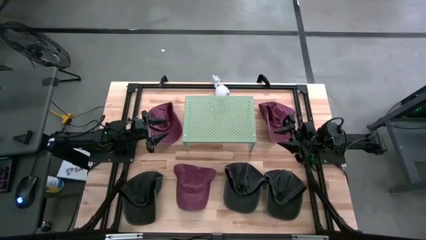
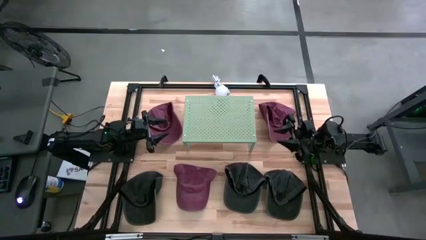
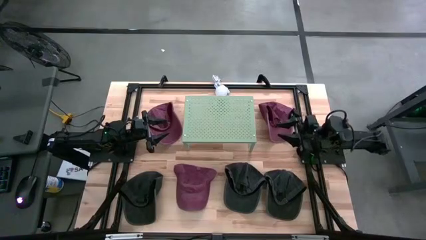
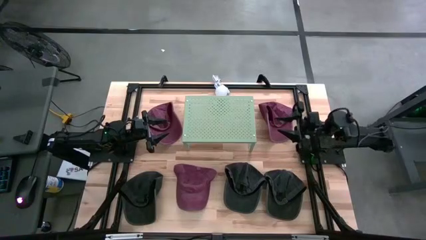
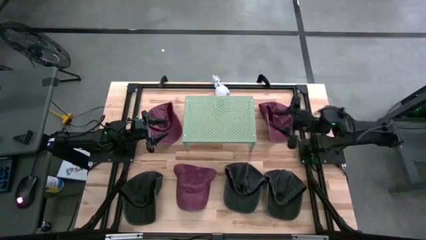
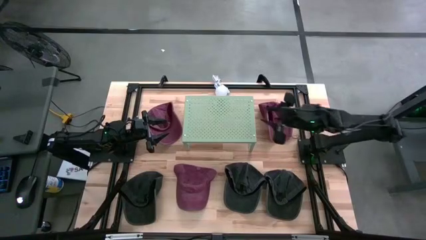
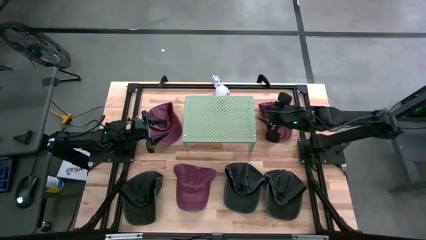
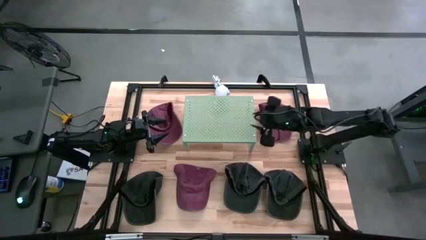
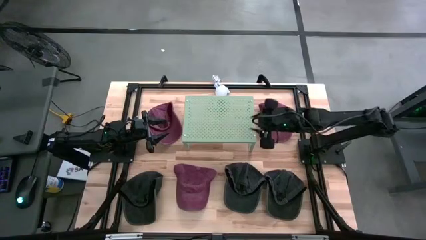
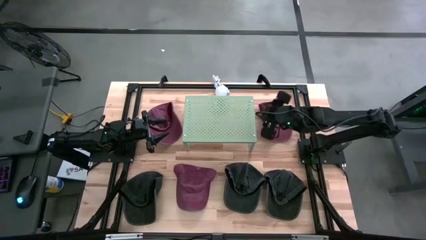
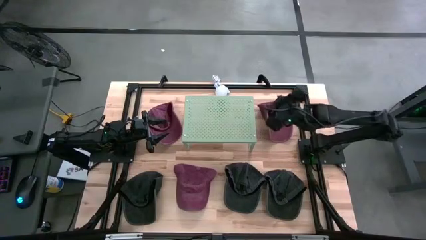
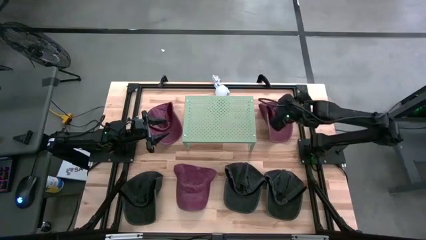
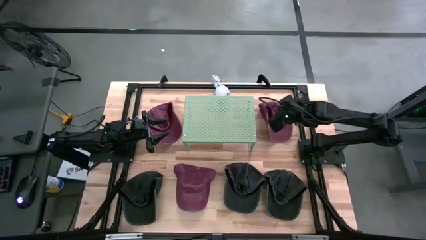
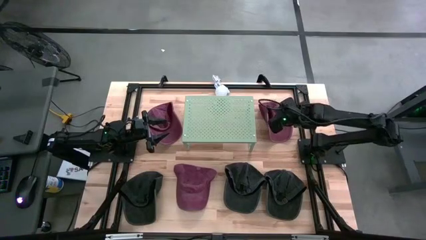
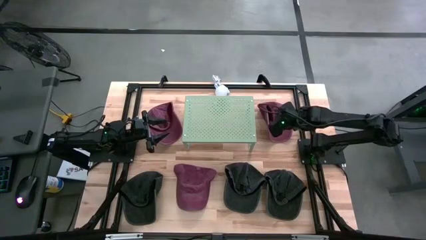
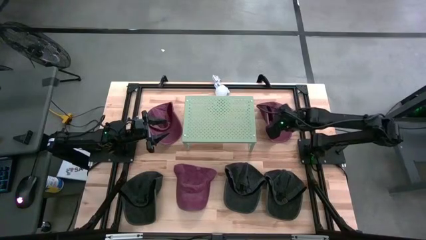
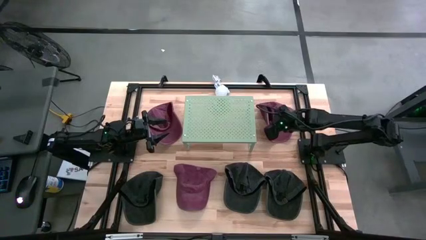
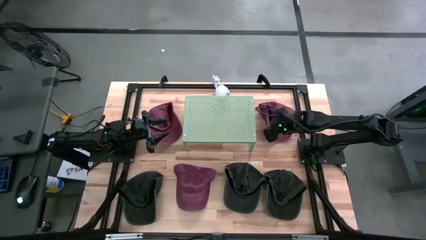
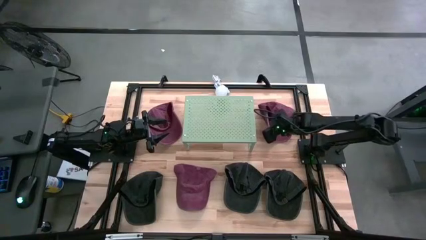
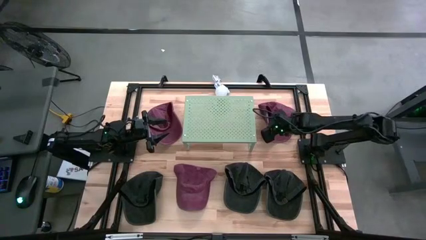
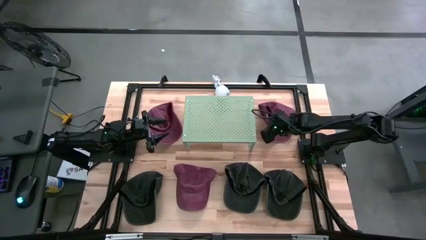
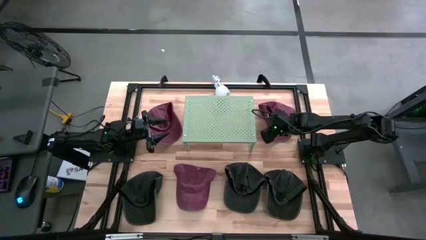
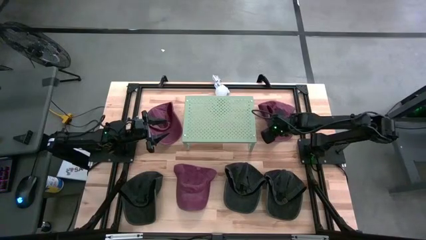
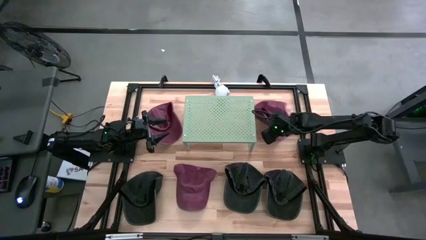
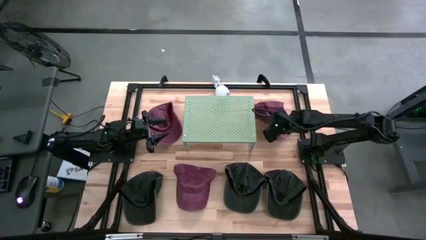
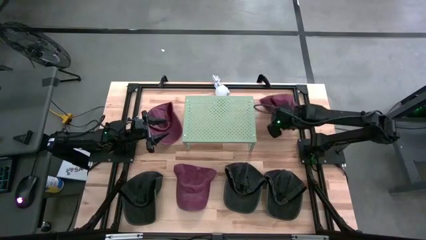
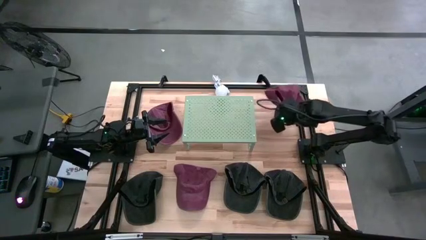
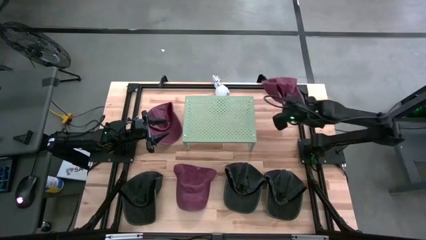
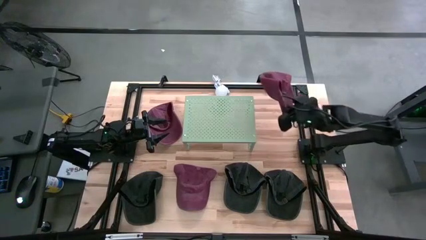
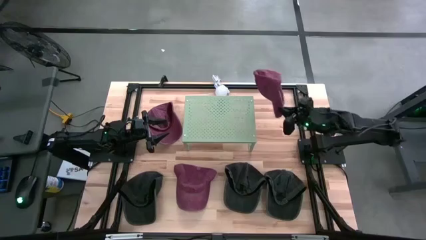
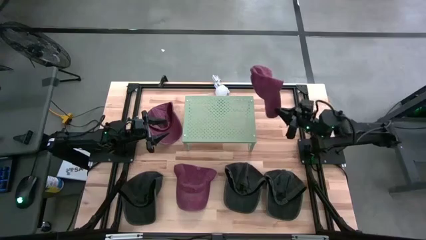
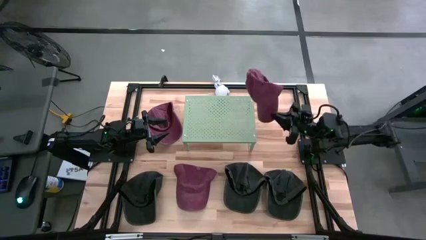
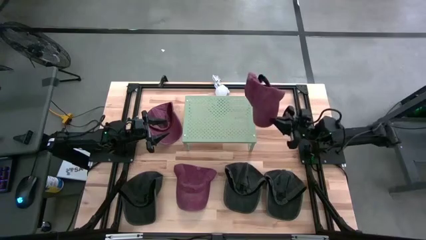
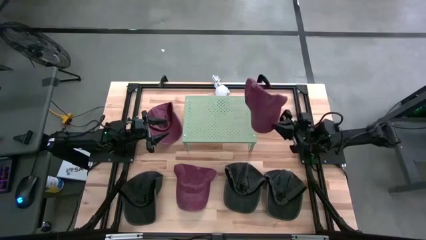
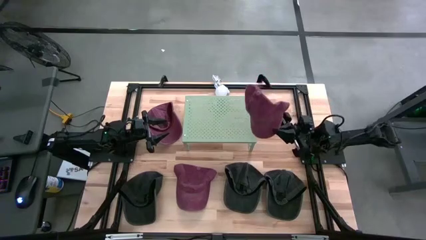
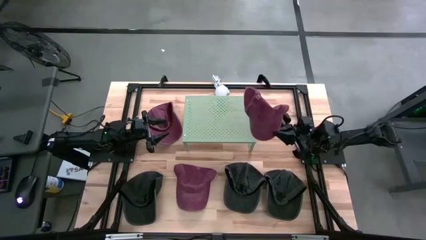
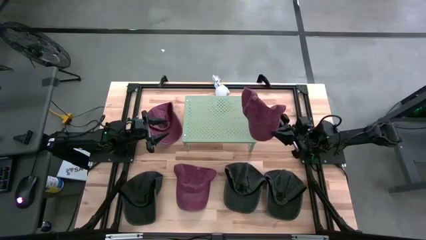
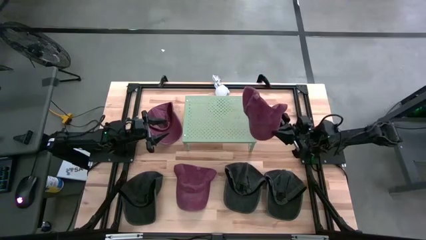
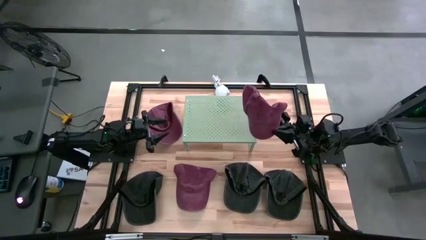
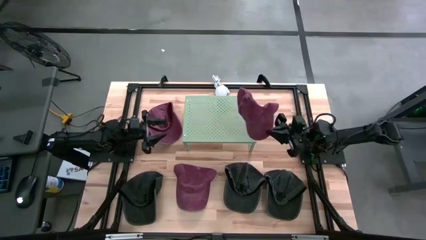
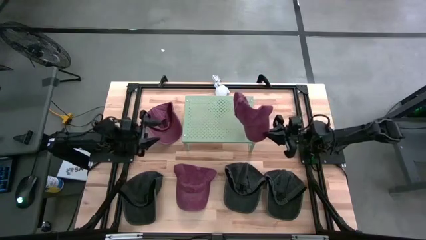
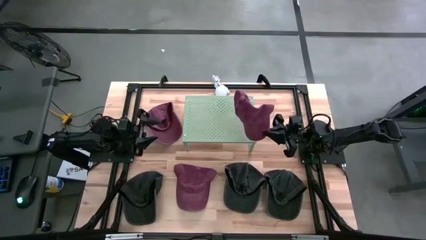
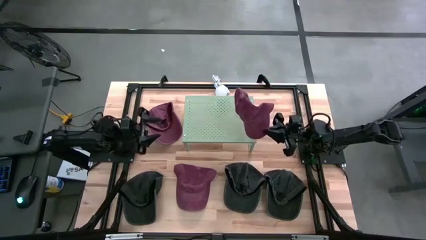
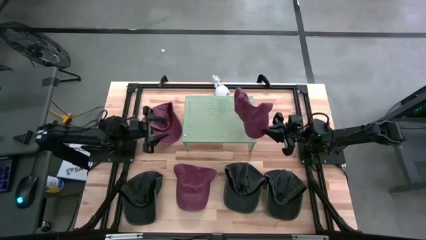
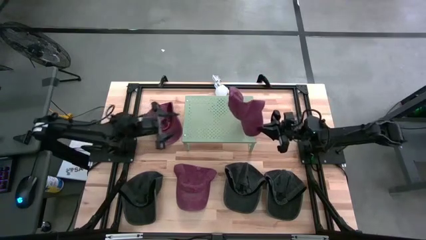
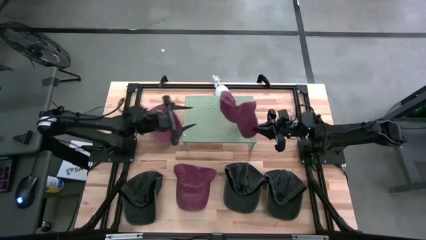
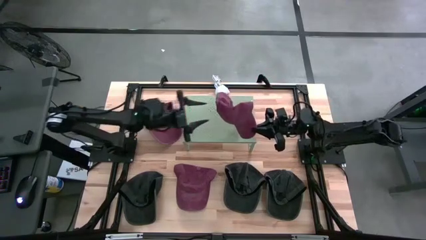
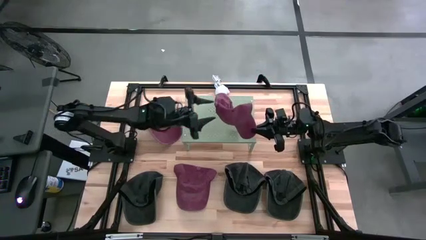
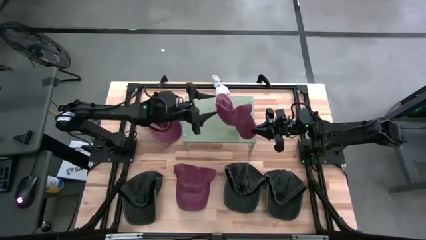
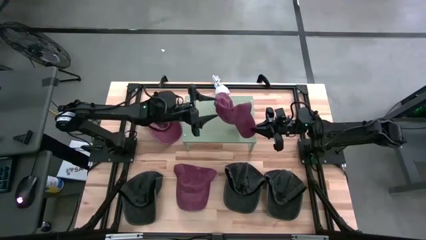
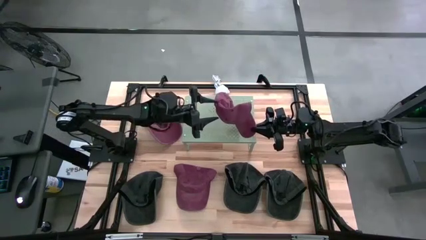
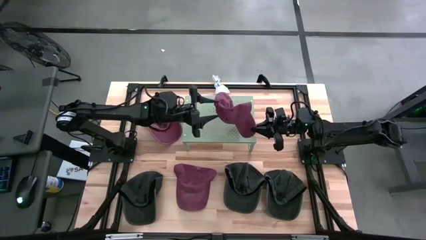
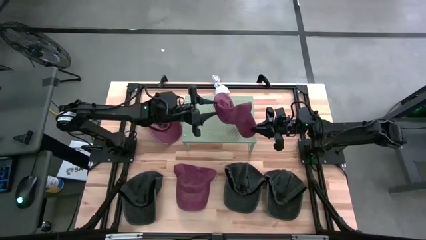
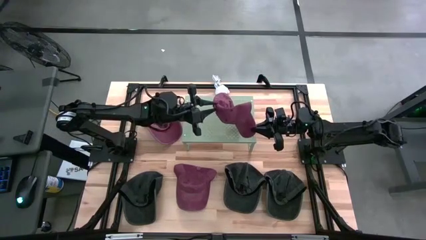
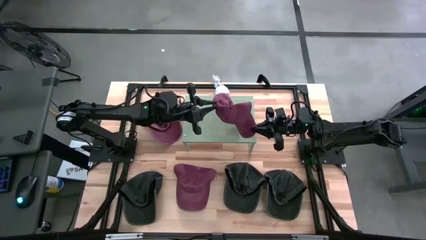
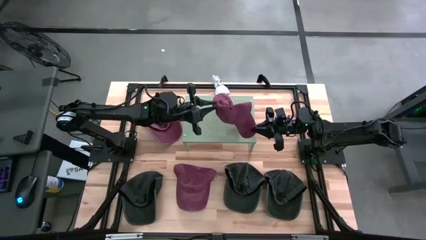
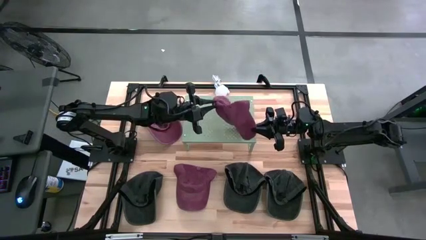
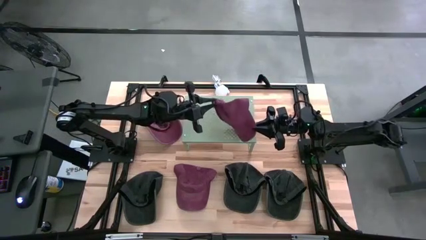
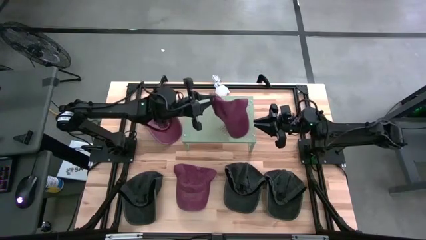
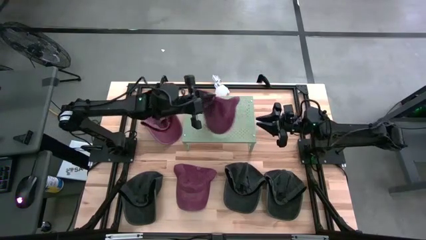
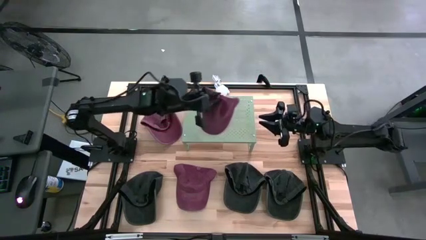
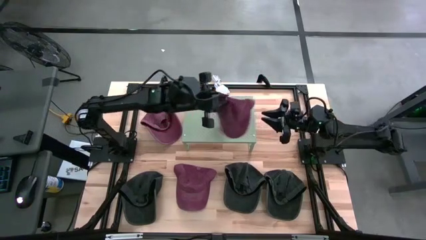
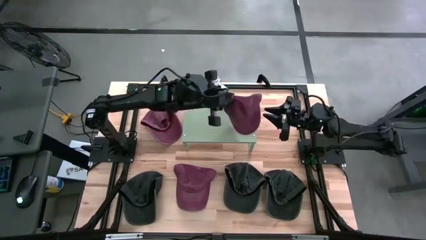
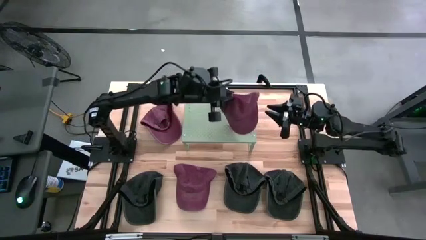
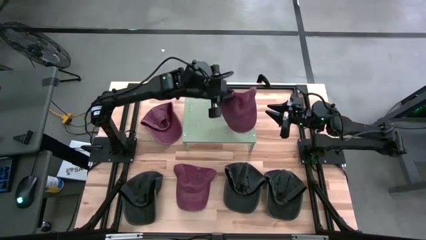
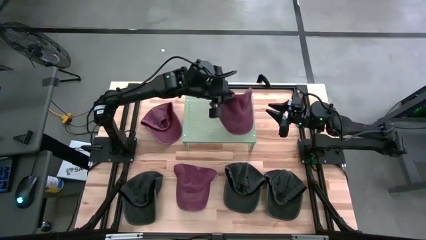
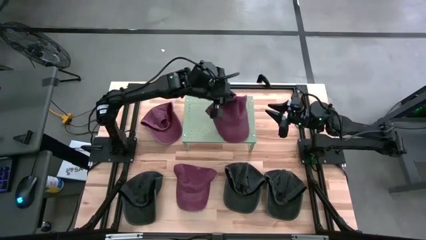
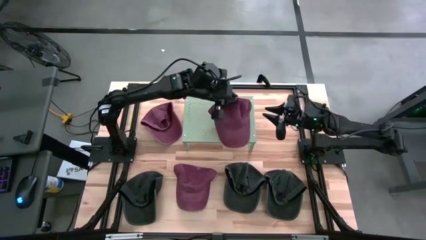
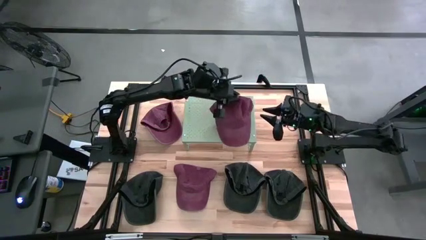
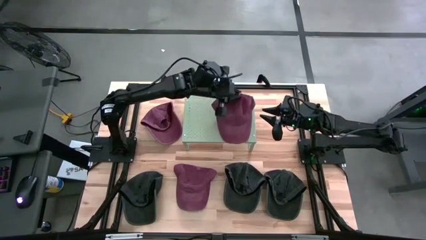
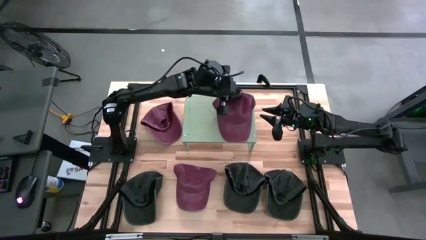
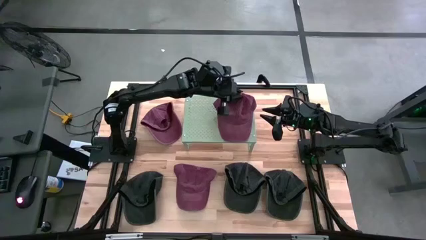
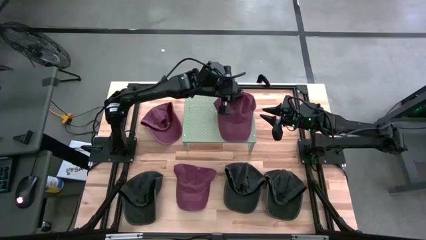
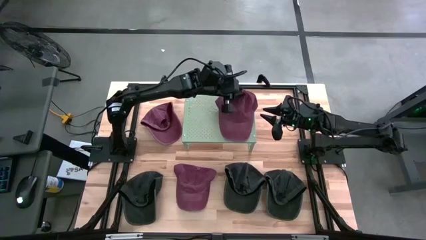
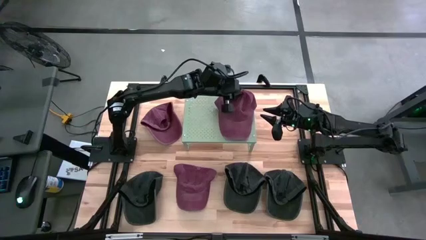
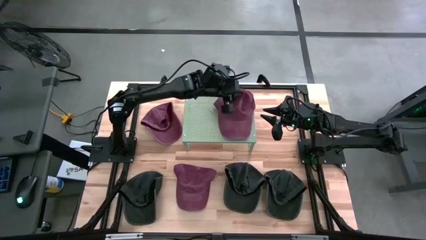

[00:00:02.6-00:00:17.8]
Task: Pick & Place hat
Put the right red cap on the shelf

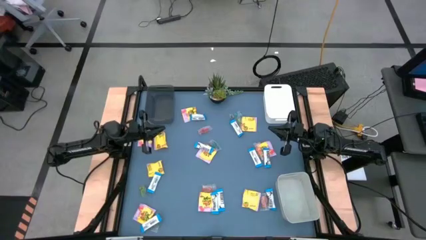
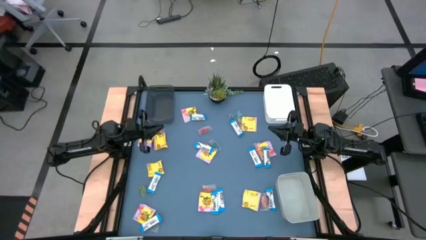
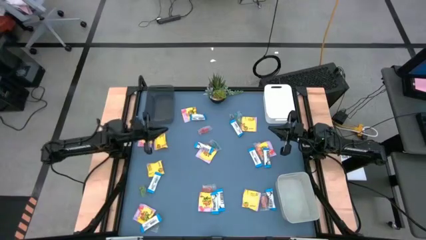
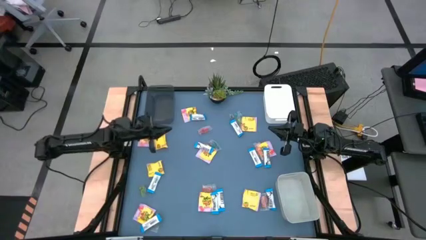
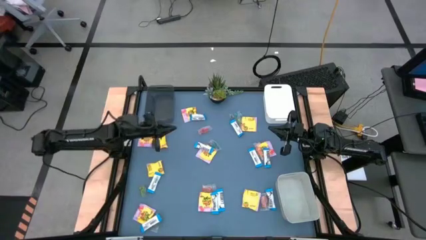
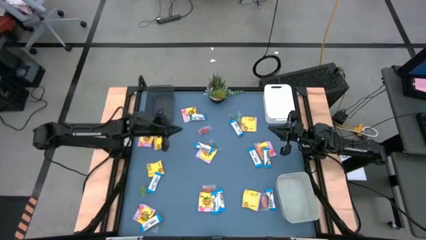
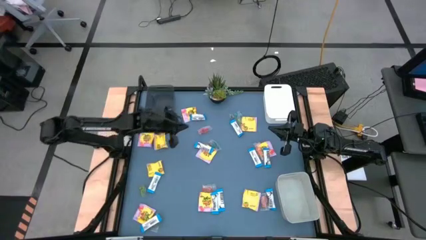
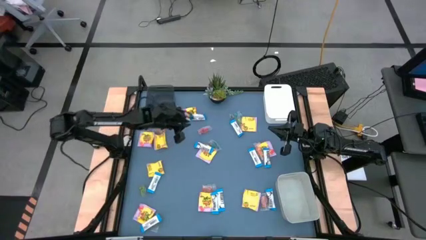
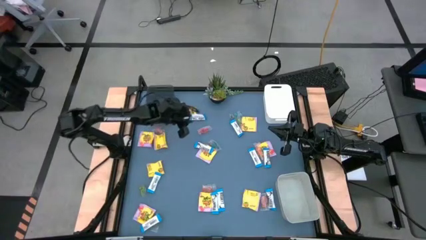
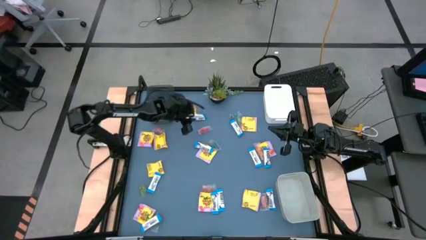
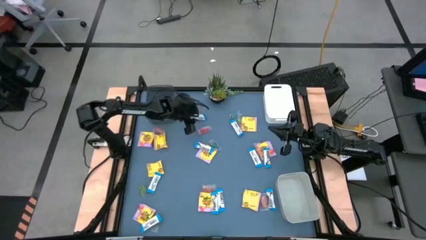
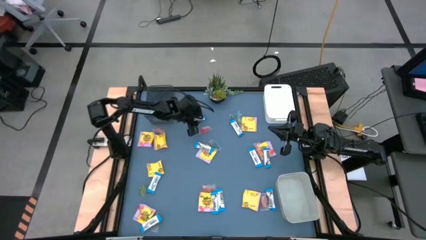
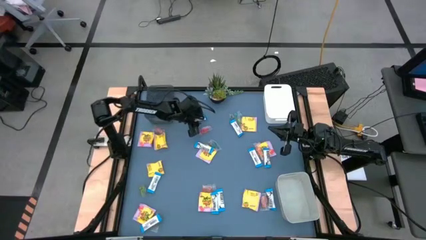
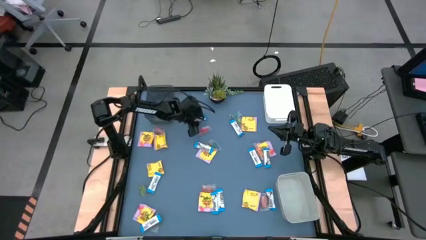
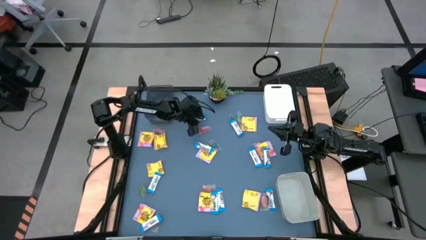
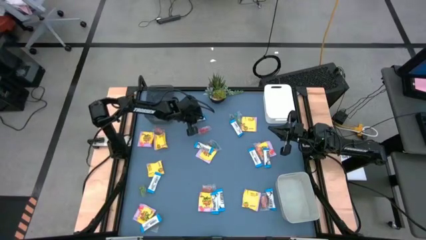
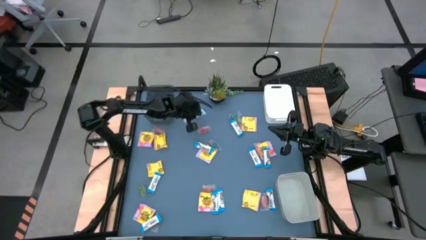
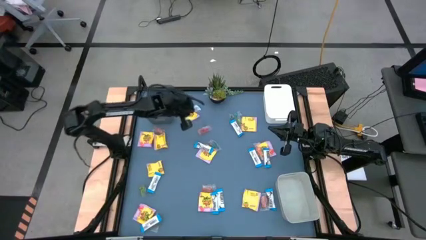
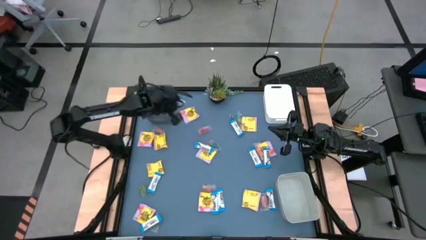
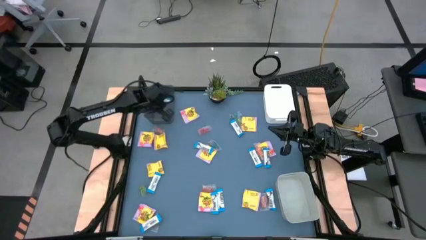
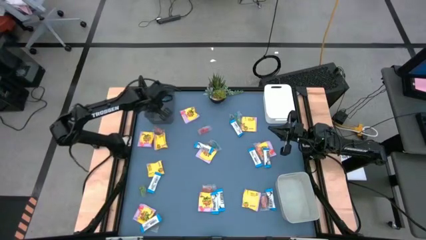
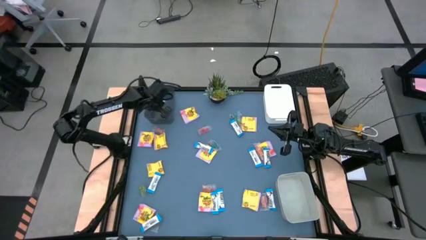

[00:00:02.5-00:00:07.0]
Task: Sort candy
Put the top left white chocolate bar into the transparent black bin
